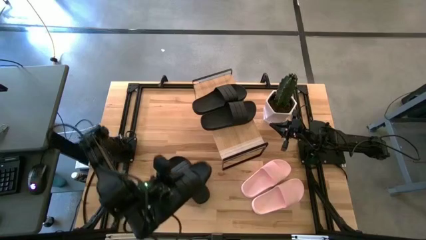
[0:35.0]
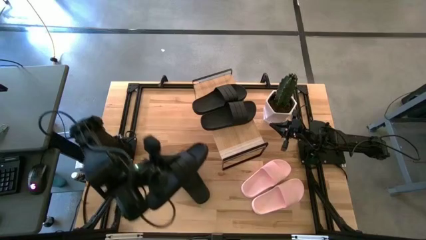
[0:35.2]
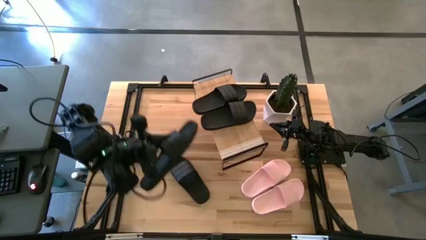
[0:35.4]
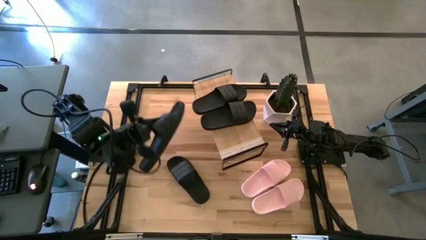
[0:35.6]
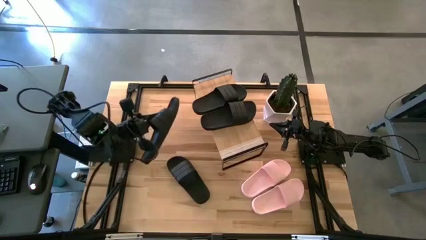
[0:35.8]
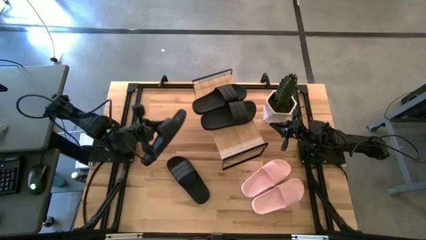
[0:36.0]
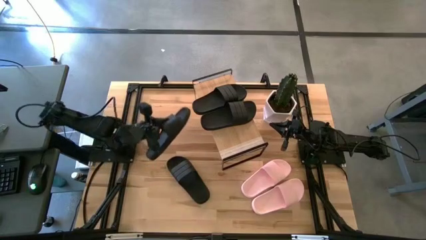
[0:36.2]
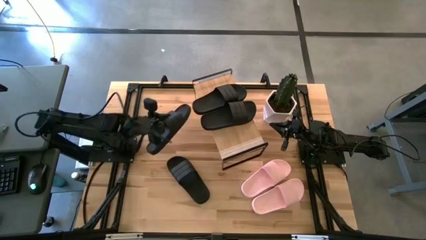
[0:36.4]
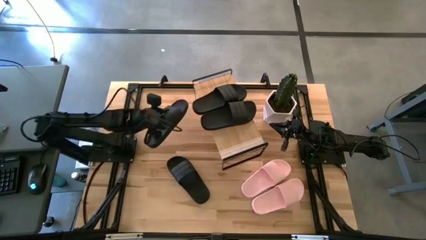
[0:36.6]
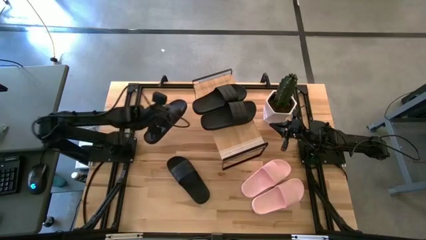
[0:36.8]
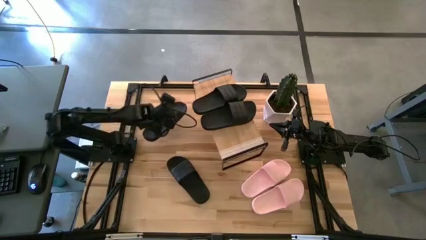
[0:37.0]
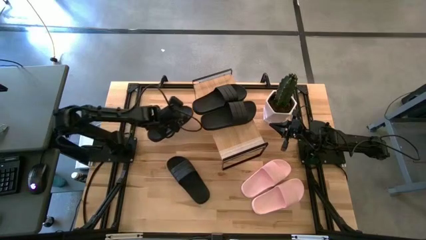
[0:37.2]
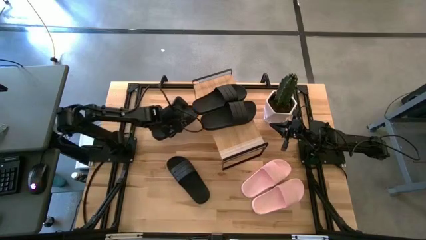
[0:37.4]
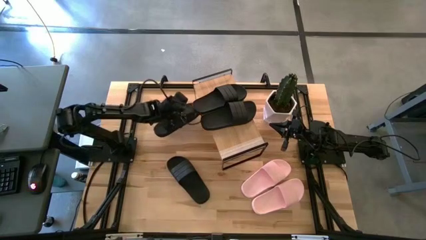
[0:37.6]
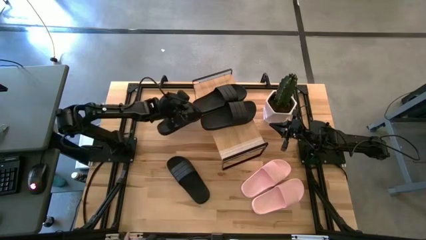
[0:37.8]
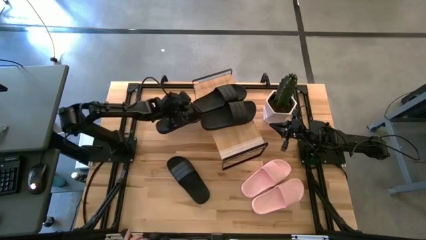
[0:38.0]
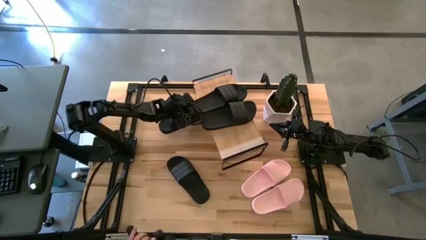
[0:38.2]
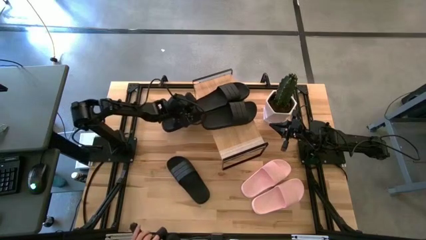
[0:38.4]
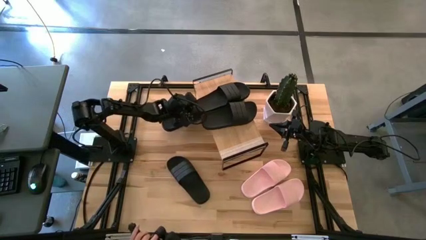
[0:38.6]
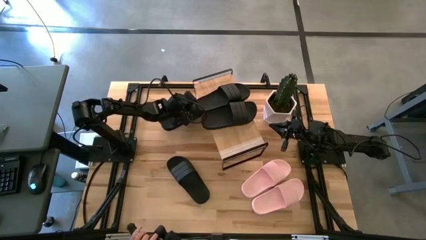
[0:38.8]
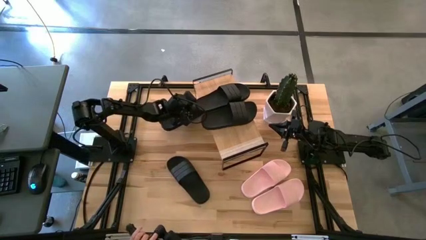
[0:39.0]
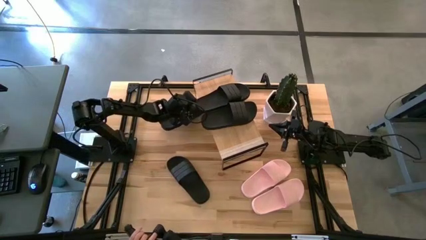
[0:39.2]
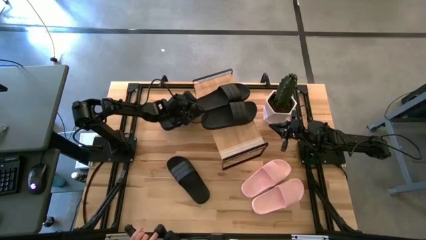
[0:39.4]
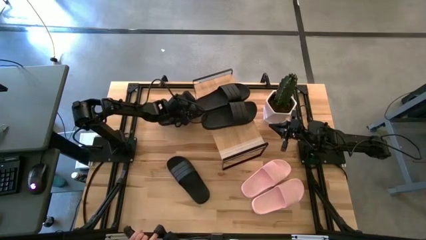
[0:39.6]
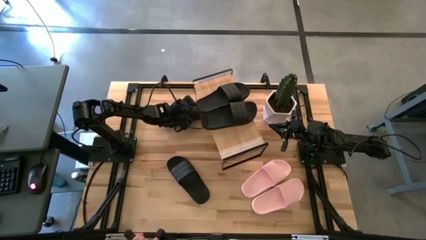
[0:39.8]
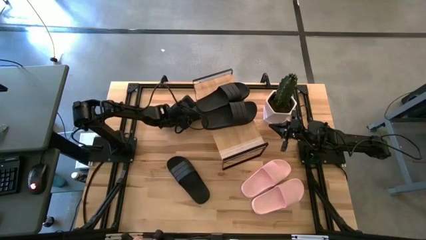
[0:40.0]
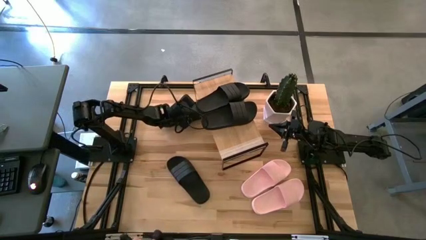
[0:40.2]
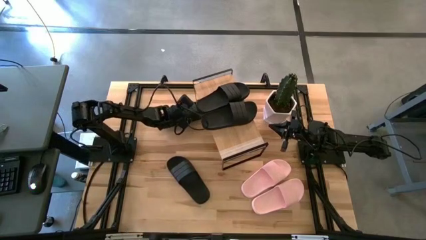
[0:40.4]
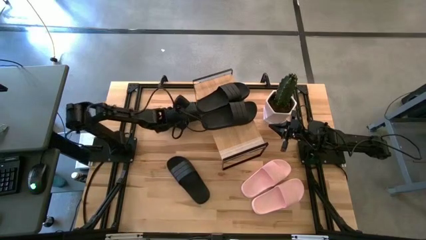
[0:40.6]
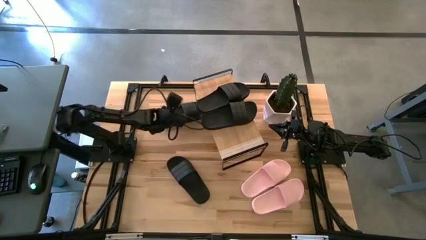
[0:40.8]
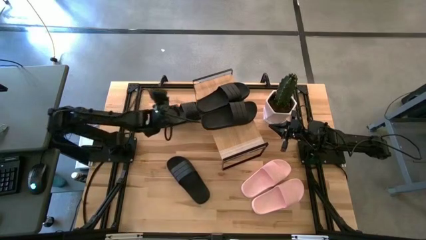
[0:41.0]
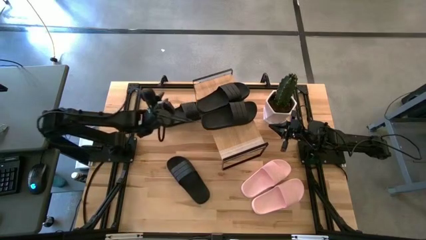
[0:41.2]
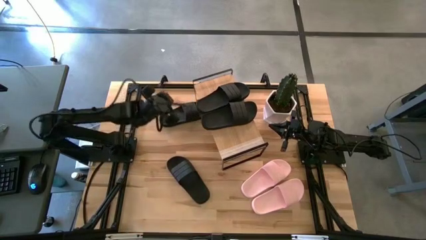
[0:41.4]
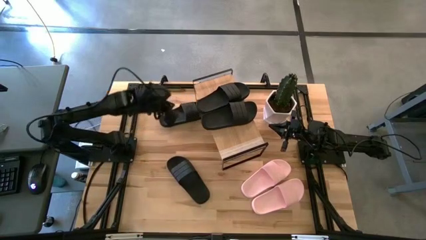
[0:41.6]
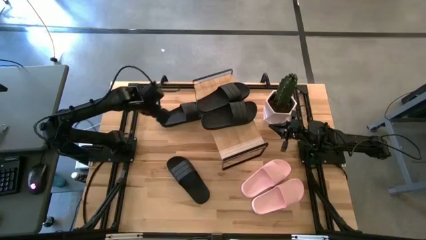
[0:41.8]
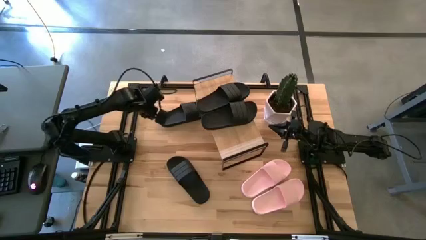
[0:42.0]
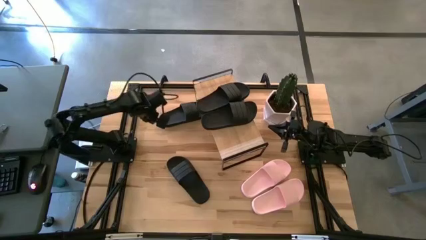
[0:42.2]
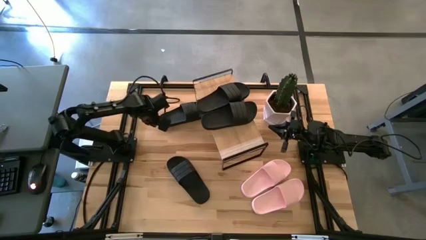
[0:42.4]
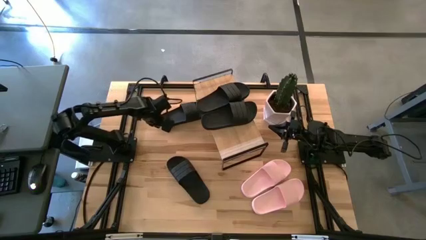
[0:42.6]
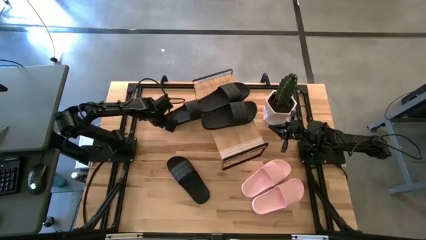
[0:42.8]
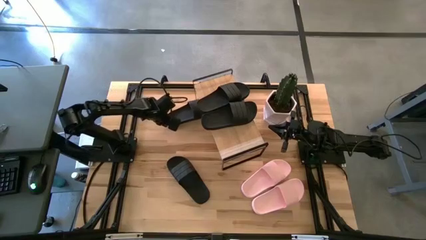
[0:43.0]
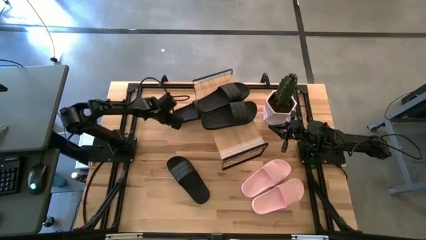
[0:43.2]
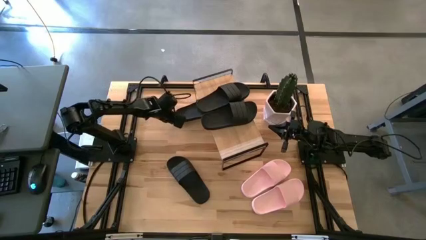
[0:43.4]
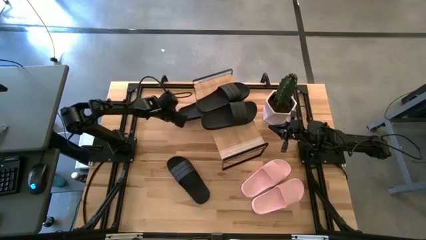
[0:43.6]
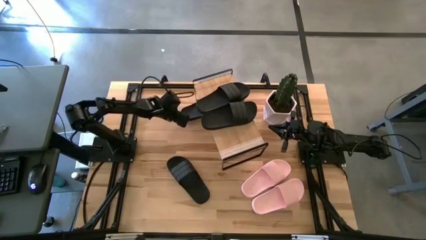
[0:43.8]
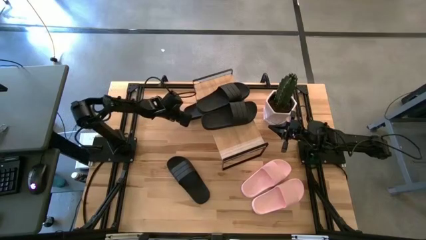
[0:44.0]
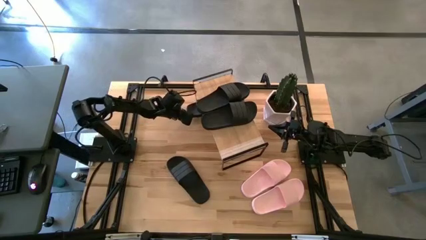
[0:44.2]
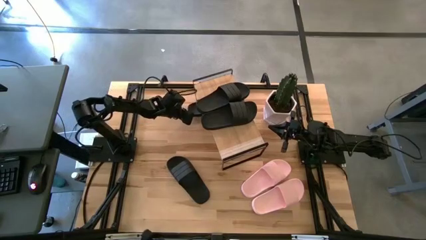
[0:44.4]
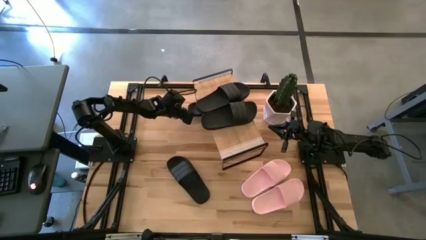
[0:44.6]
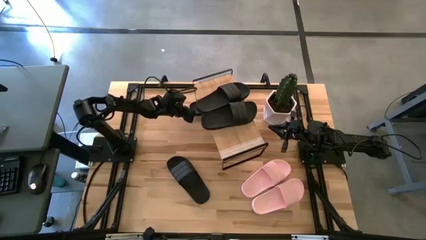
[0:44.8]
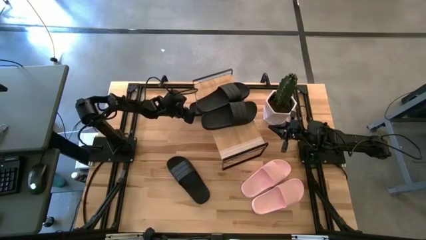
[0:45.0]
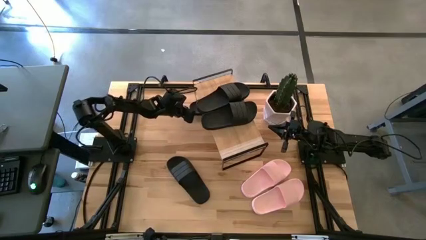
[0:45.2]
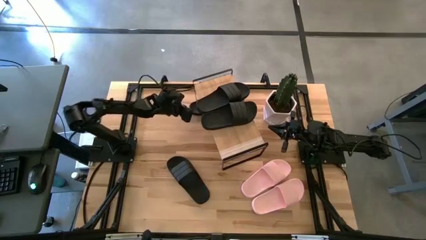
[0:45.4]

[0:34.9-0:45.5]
Task: Pick and place slides into the shelf
Put the black slide under the shelf

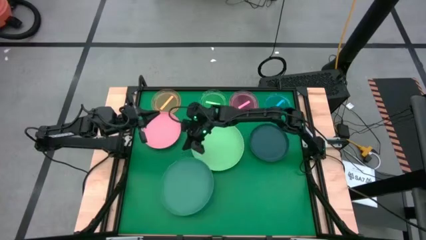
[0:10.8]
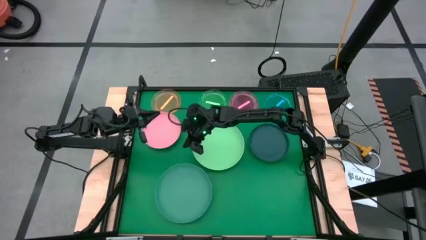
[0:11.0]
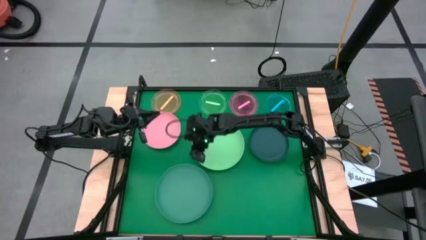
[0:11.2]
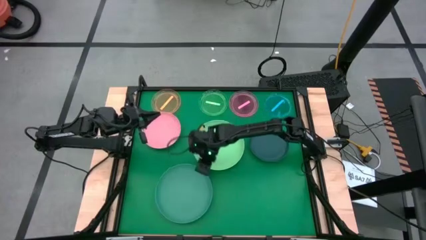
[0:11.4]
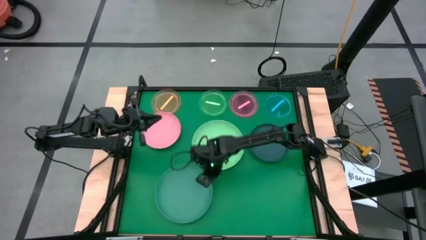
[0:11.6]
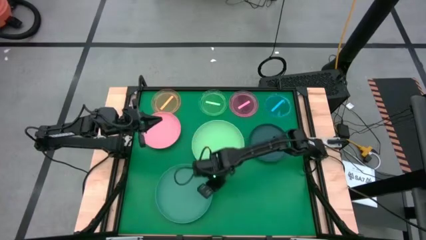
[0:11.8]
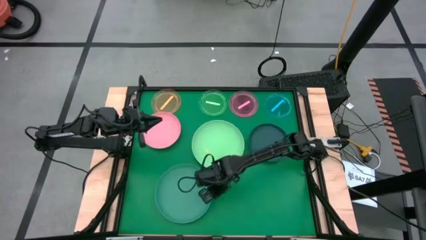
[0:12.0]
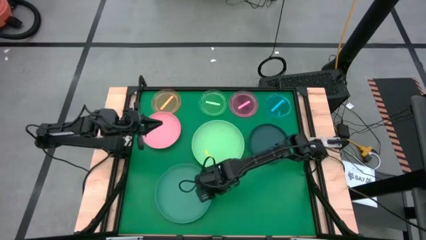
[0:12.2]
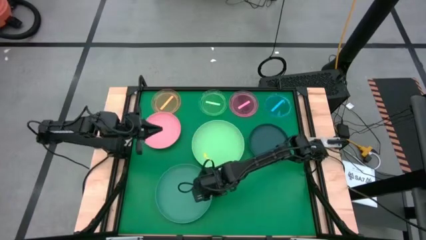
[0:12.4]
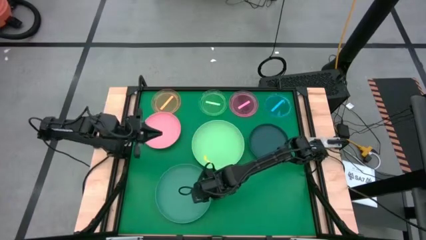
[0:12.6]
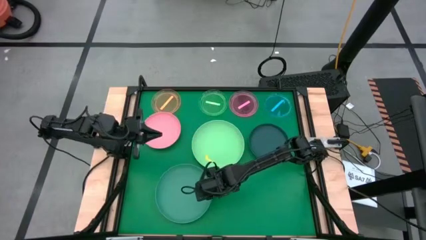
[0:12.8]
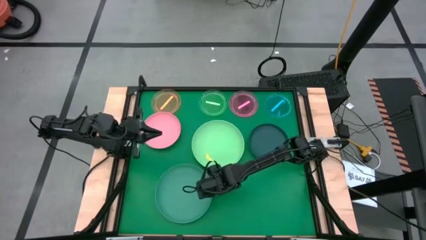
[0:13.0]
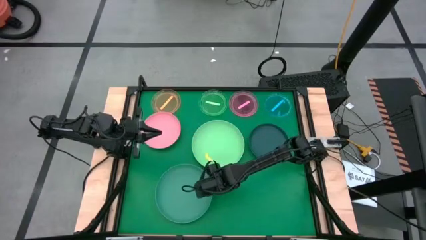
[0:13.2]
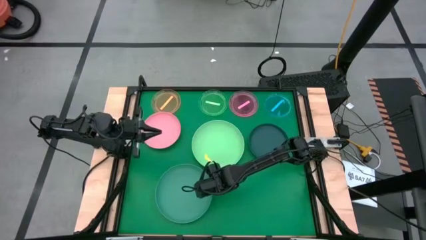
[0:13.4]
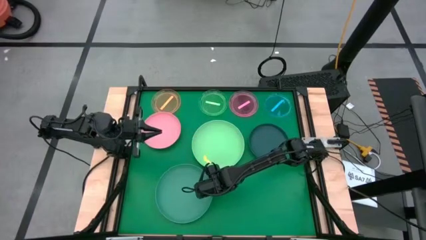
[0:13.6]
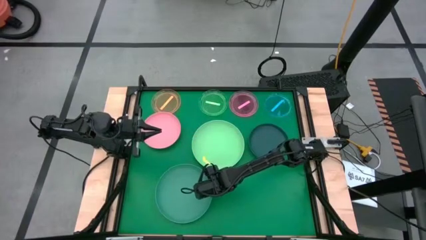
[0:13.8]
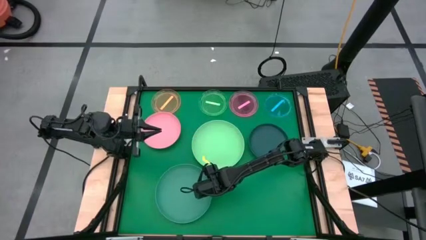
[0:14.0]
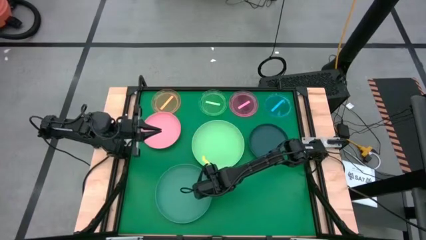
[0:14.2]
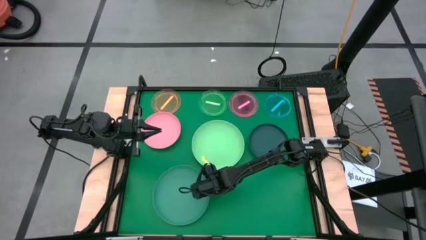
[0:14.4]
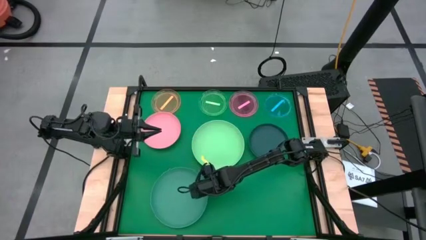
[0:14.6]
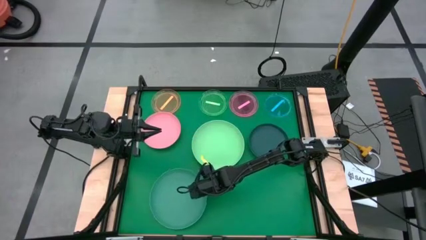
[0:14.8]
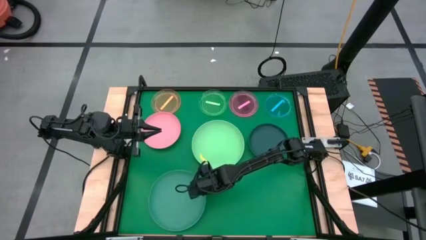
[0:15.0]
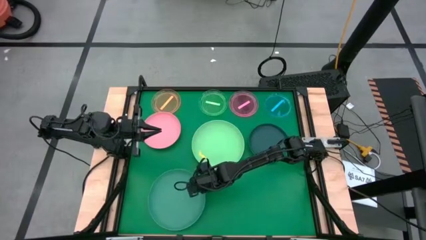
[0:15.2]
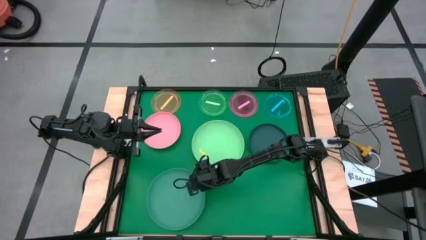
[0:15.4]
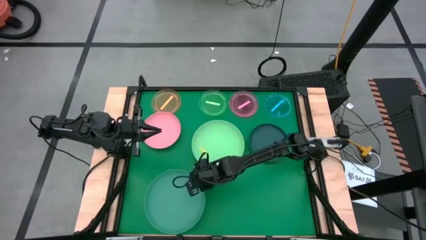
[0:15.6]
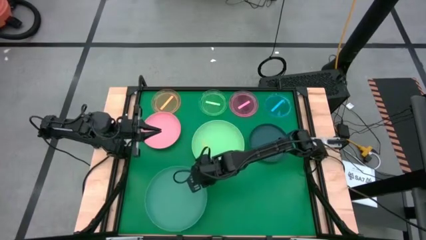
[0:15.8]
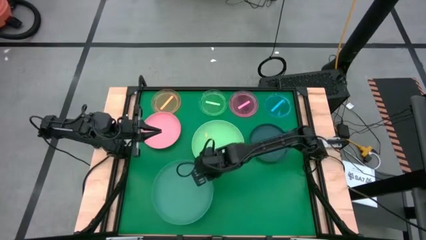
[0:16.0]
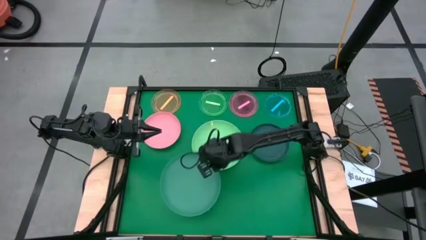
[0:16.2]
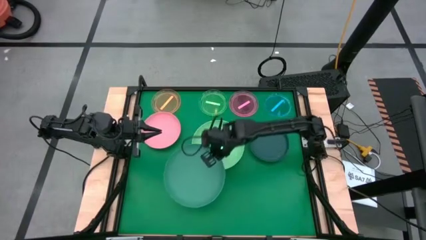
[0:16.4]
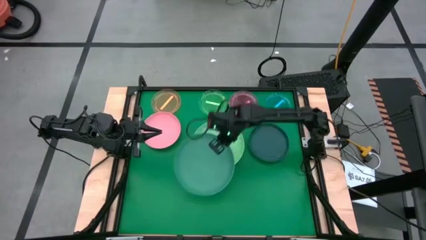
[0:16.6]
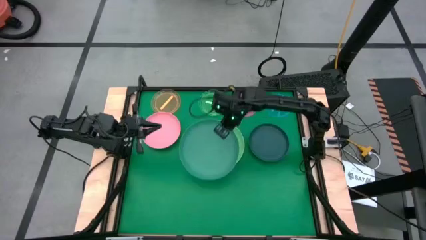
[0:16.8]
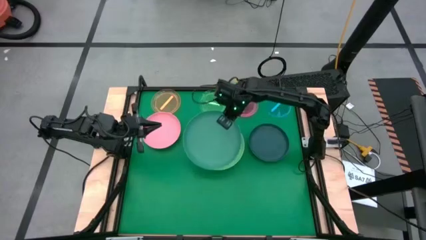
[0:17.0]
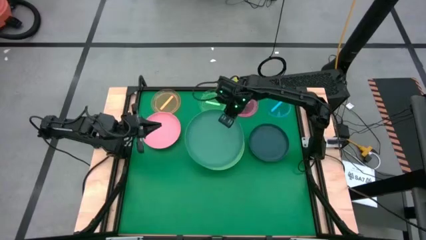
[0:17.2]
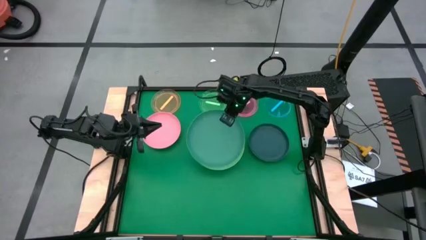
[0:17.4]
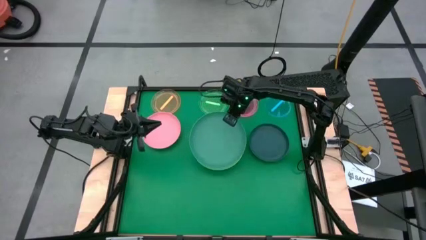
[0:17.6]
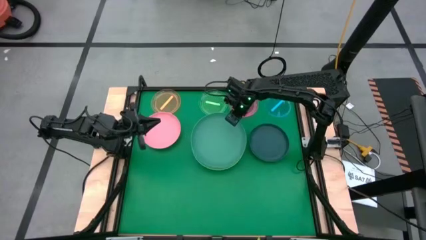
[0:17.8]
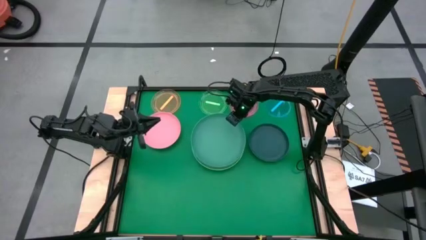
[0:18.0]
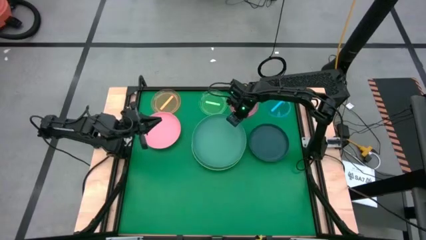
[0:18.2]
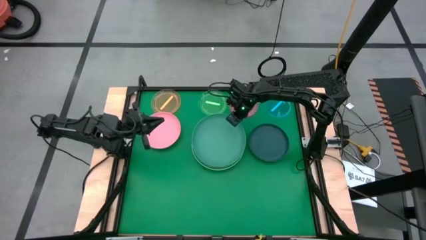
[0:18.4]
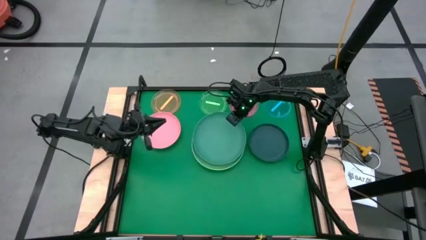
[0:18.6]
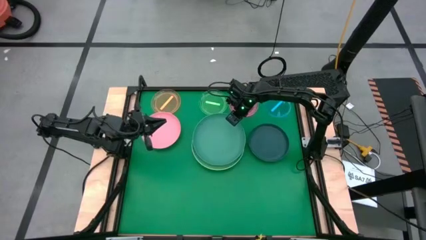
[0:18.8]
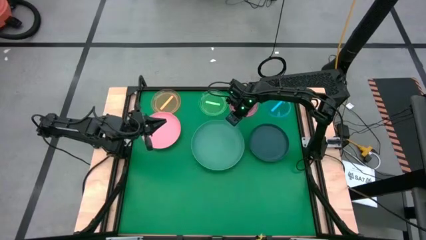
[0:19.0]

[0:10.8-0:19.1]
Task: Stack plastic plates
Stack the dark green plate on top of the green plate
